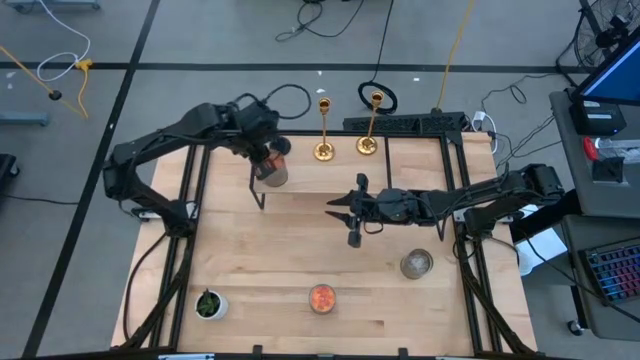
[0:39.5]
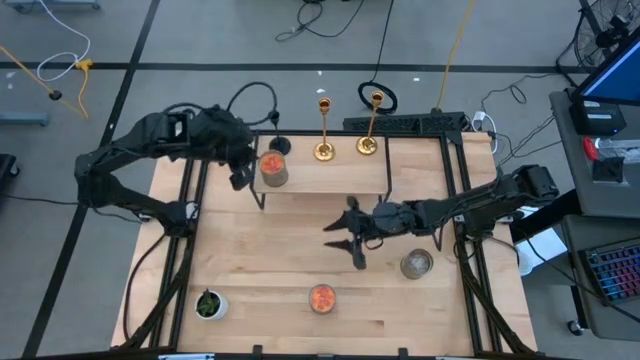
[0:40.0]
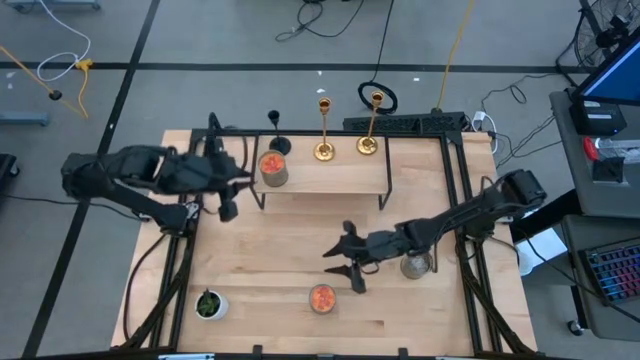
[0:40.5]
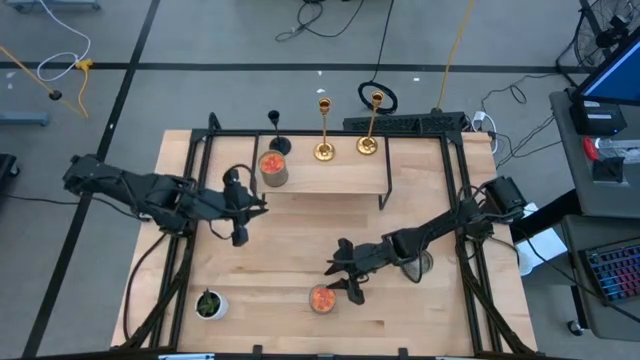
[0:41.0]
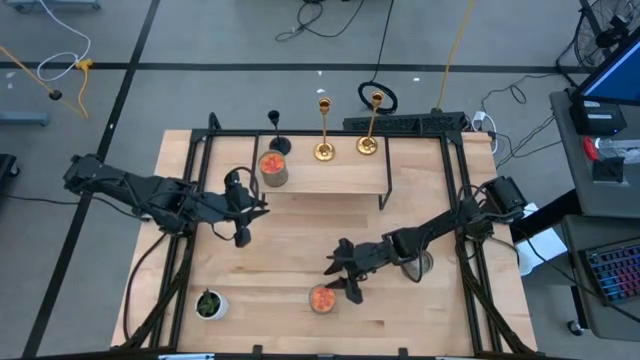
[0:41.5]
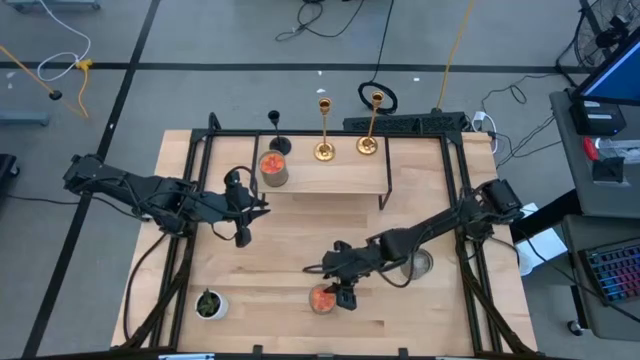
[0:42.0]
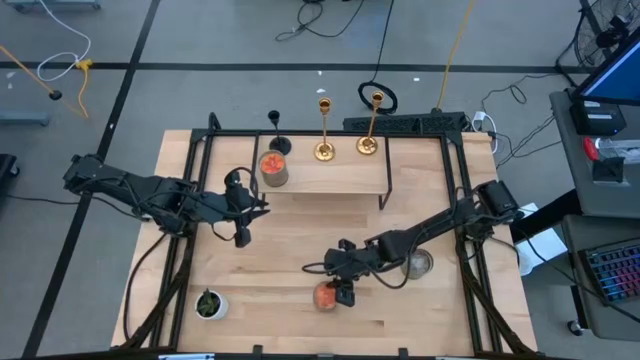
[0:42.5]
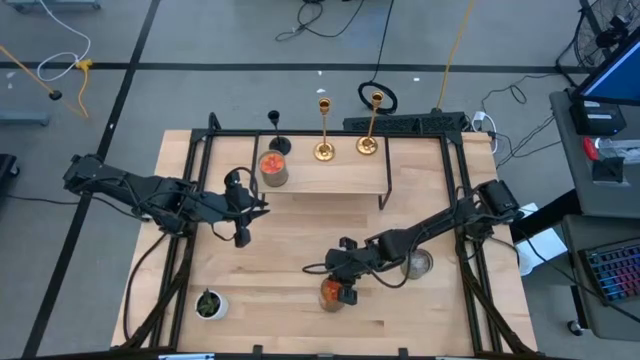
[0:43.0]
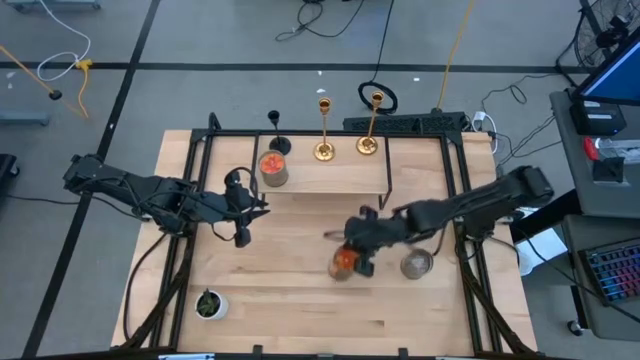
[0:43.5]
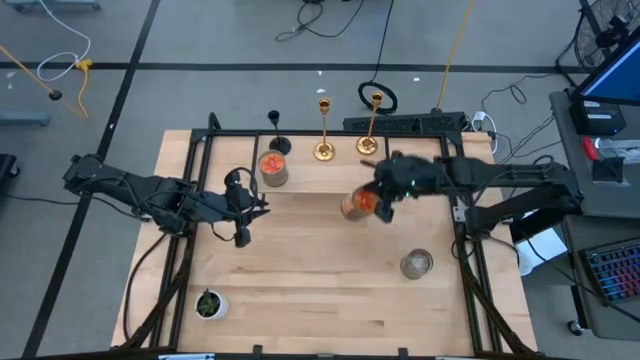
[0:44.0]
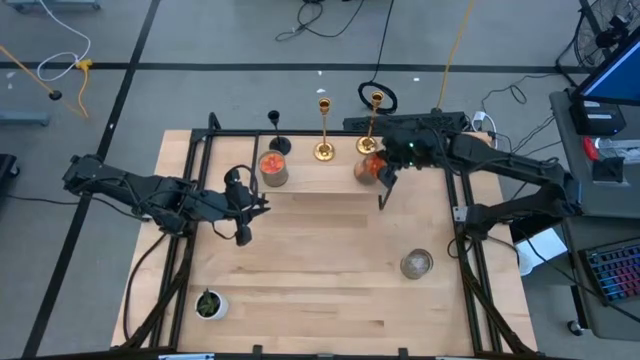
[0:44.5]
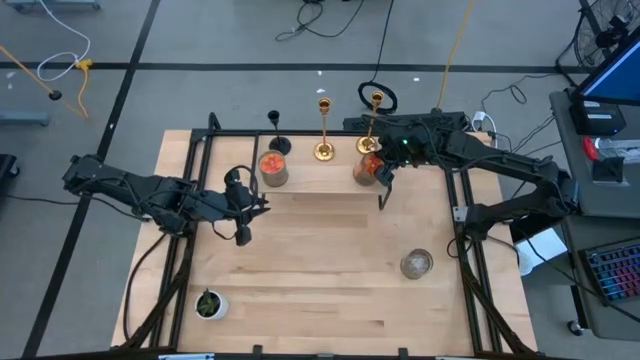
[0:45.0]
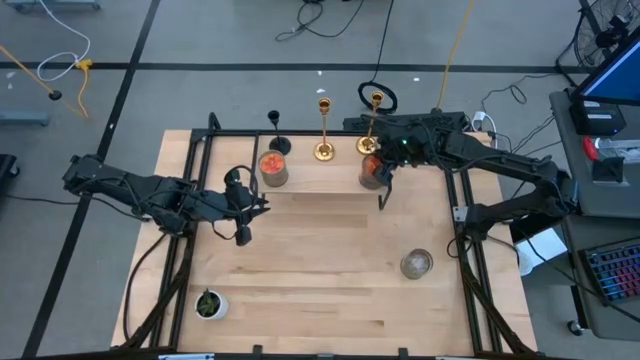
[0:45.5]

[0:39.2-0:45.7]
Task: Pick & Place candle stick holders
Put the orange scented candle on the shelf aligned with the gold candle holder

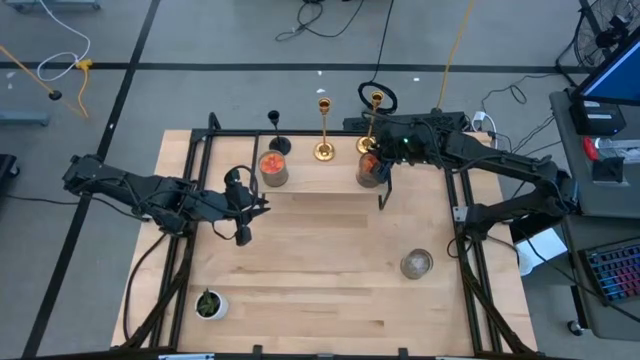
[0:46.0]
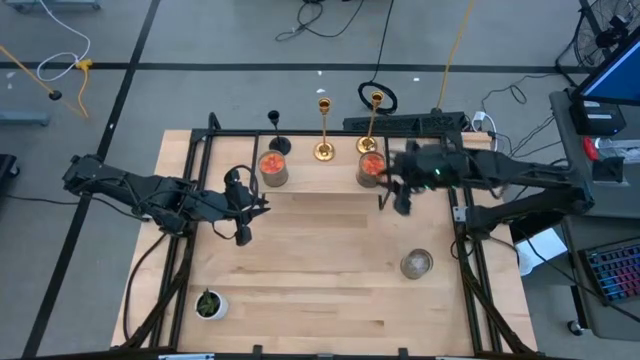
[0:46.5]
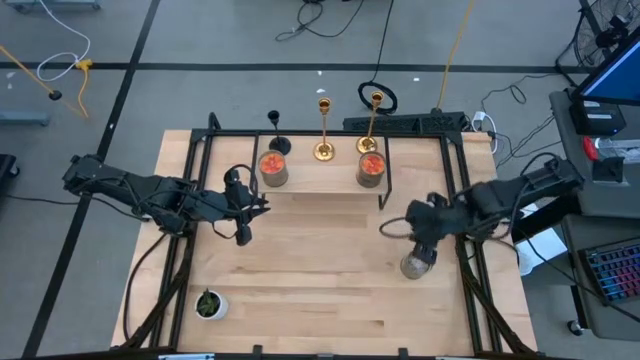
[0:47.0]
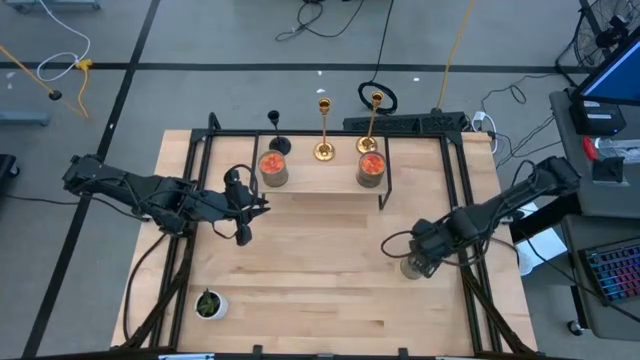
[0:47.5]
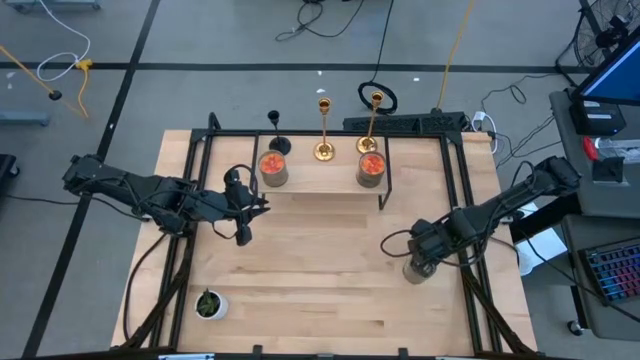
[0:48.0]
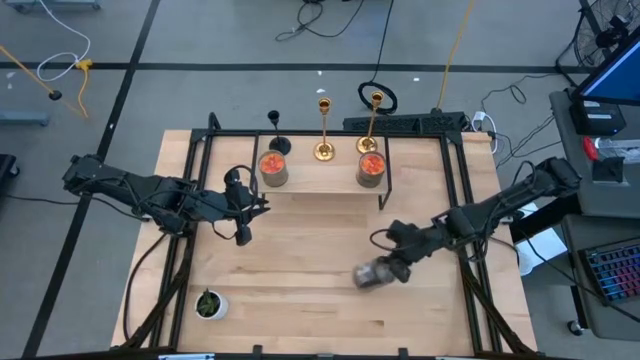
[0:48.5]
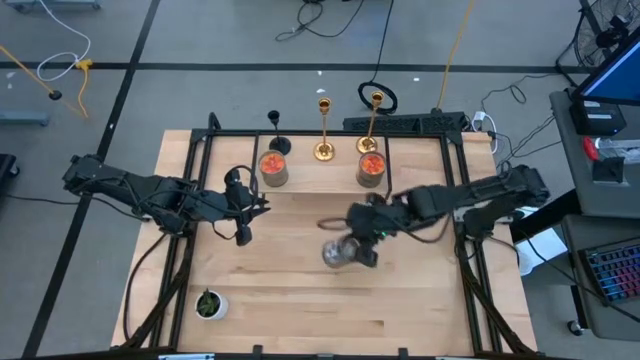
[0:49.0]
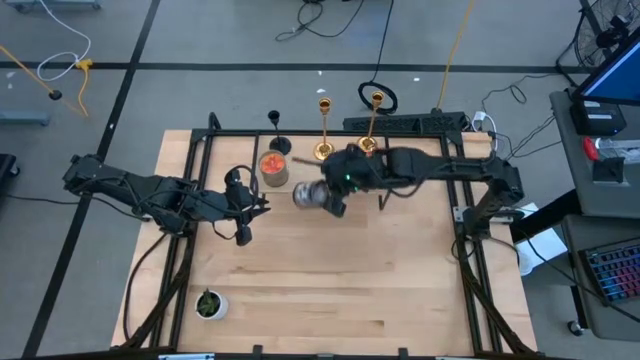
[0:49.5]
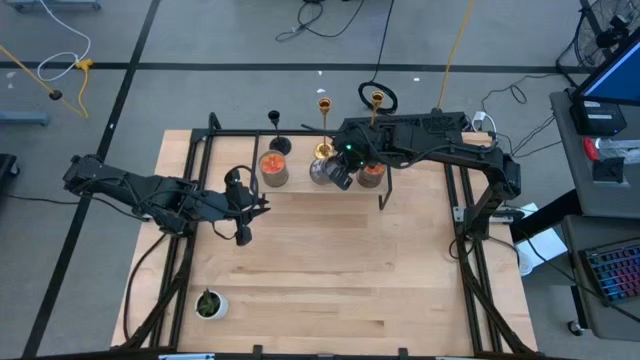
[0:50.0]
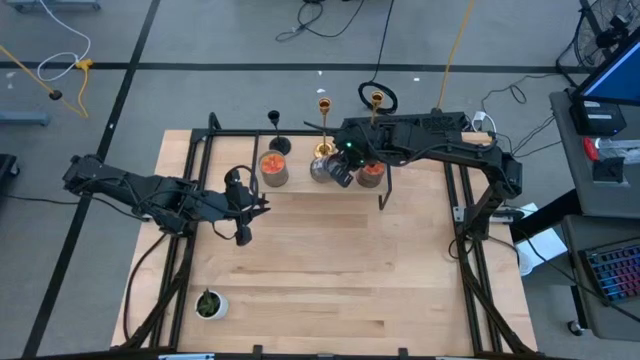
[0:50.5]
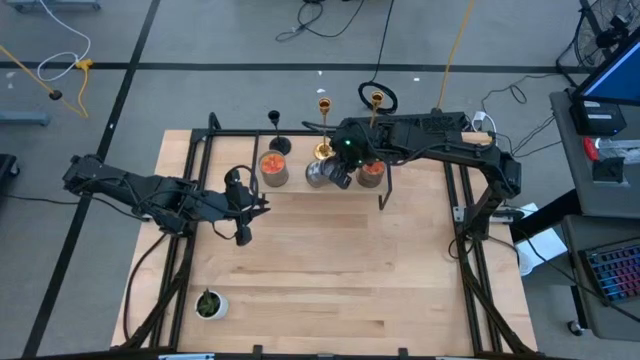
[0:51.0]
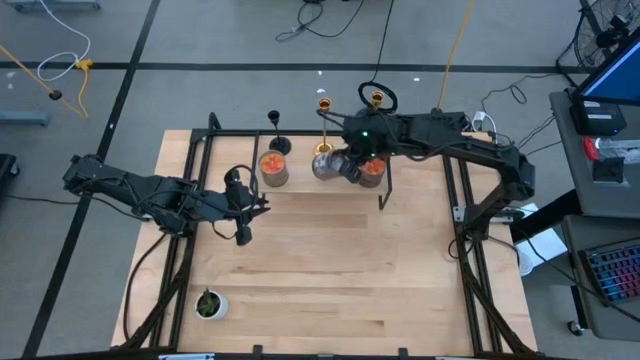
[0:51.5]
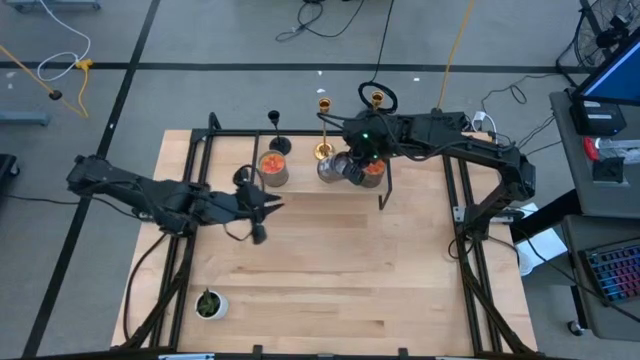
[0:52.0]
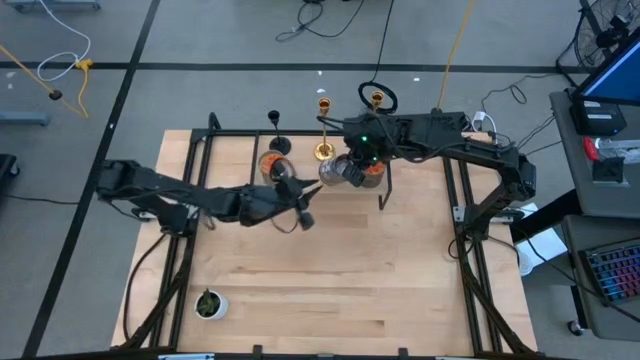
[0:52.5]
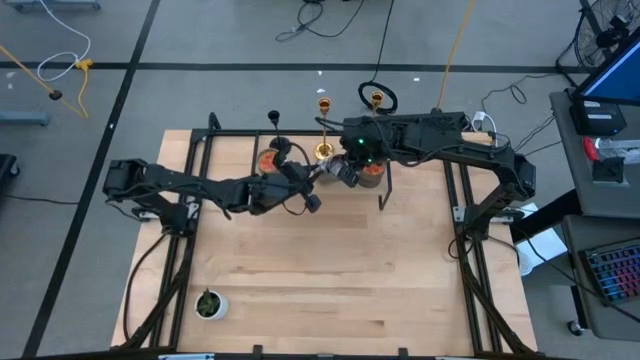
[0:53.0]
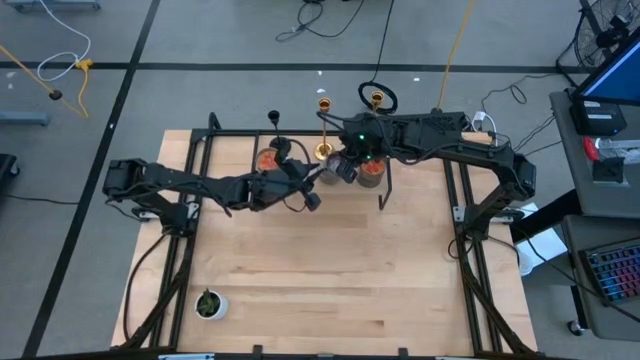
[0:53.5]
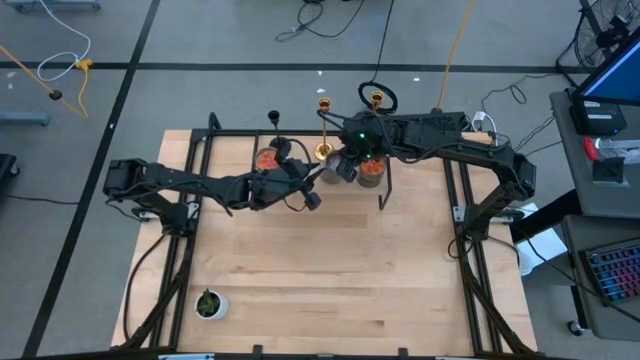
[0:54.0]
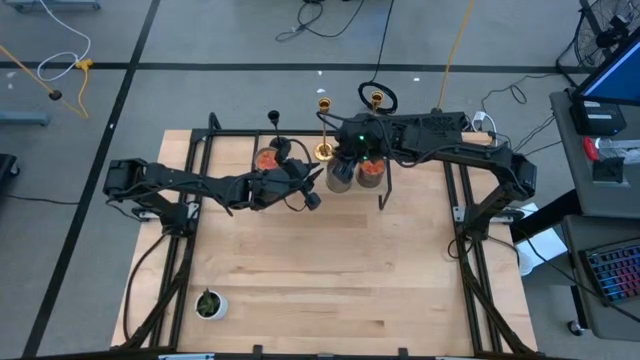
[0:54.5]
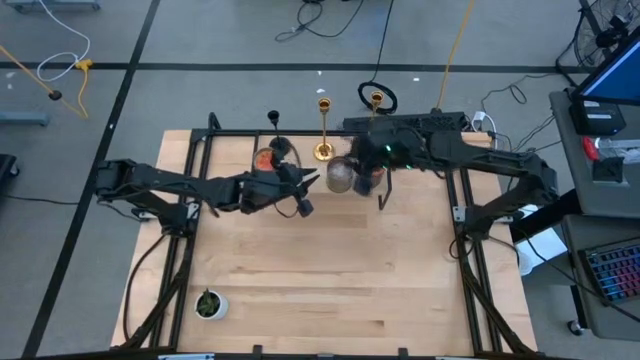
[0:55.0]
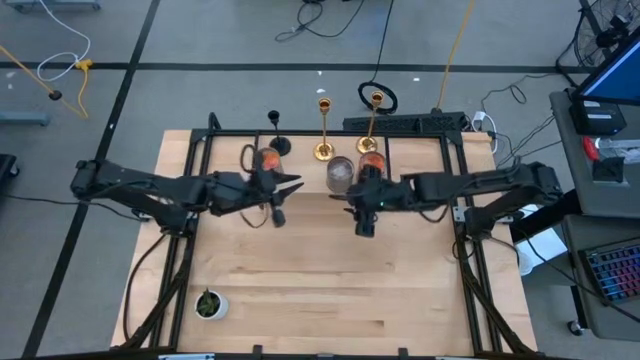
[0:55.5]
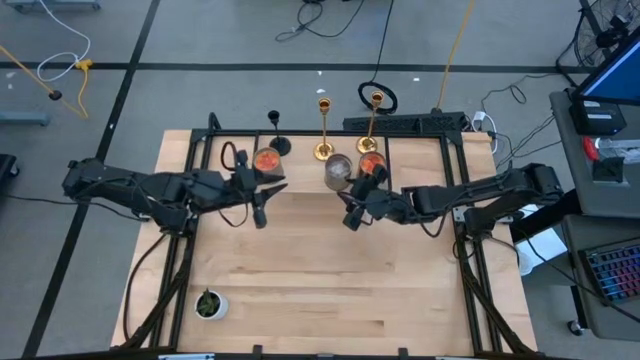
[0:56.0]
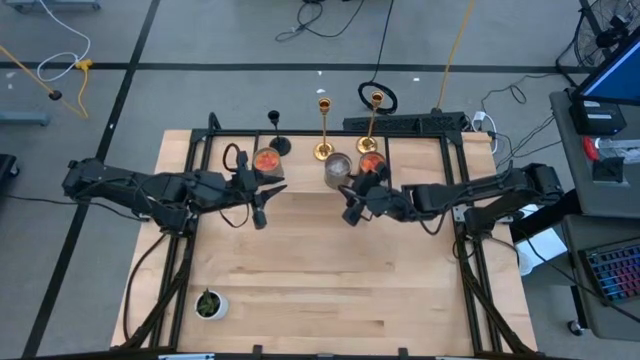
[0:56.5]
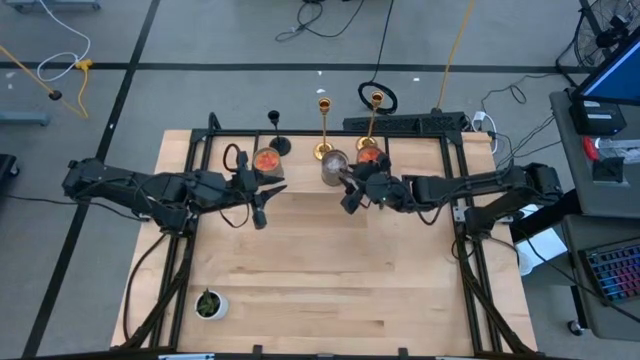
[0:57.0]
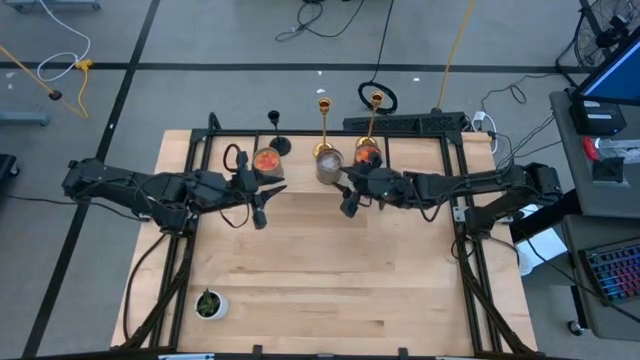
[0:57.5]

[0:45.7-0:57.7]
Put the brown scented candle on the shelf aligned with the gold candle holder

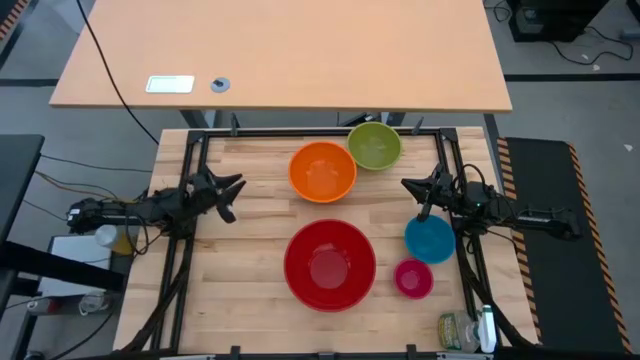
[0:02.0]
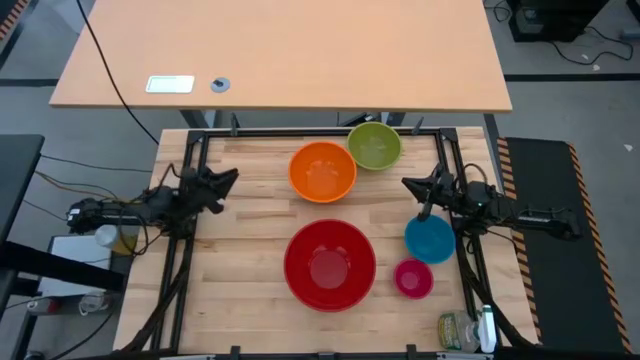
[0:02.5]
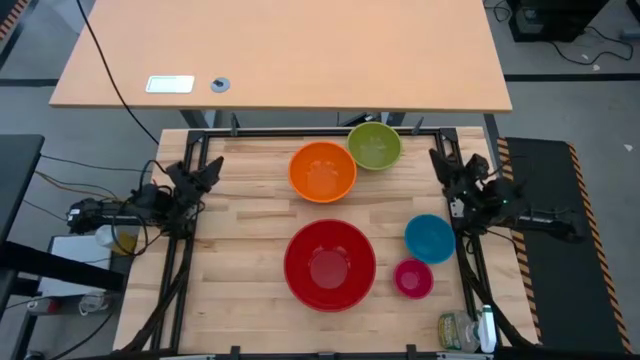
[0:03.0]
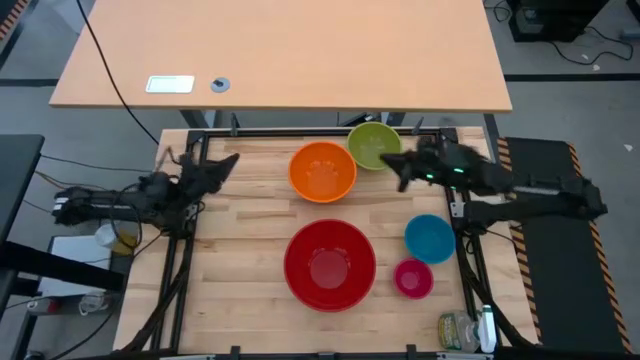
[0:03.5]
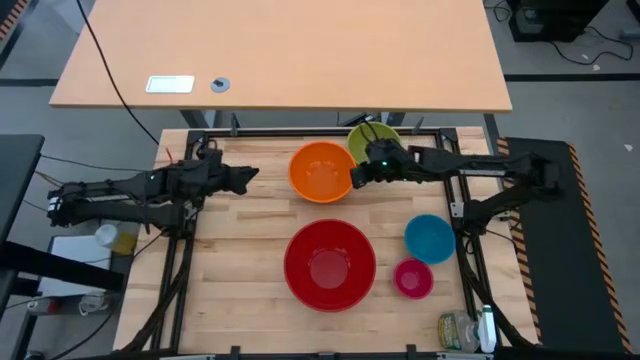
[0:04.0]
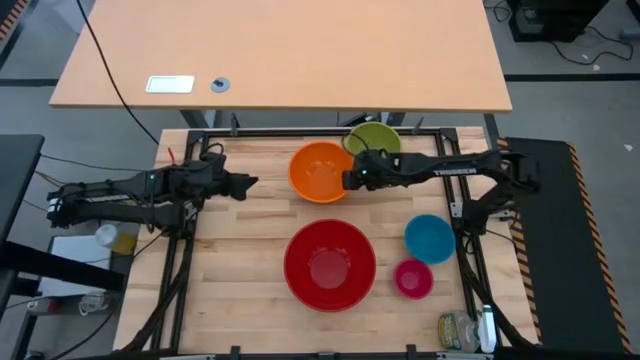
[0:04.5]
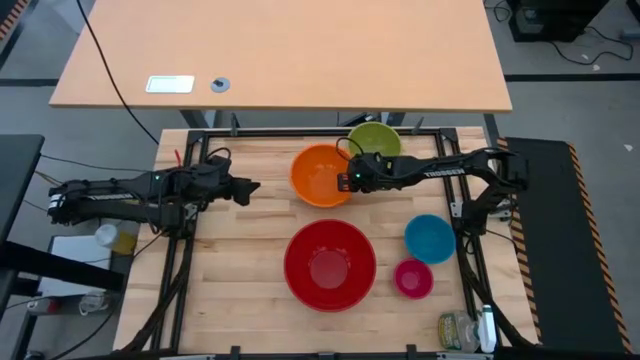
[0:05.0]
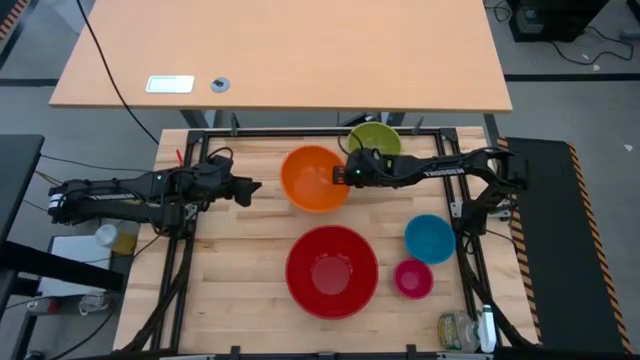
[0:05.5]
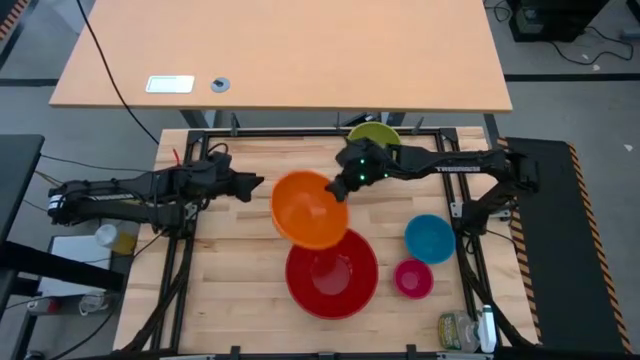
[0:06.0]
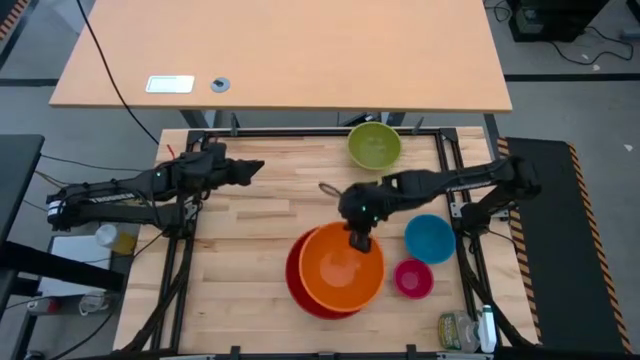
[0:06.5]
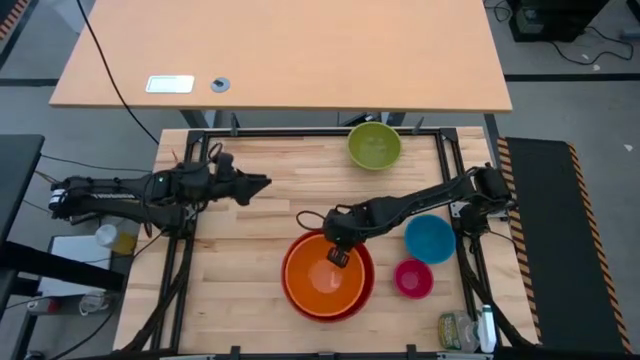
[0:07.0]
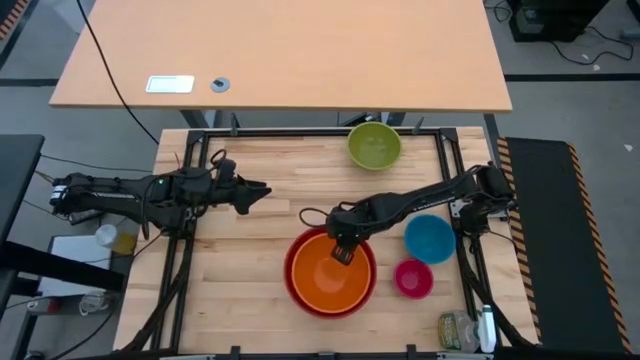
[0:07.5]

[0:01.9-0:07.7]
Task: Nest bowls inside each other by size order
Stack the orange bowl on top of the red bowl
